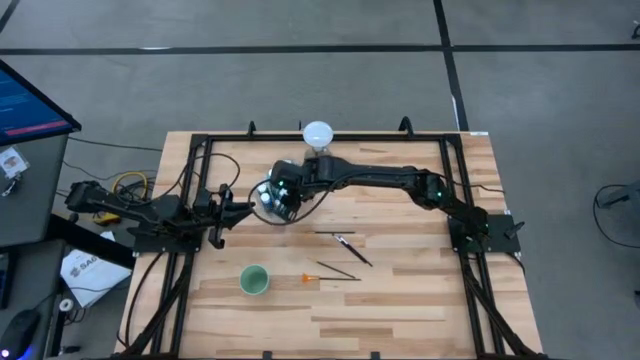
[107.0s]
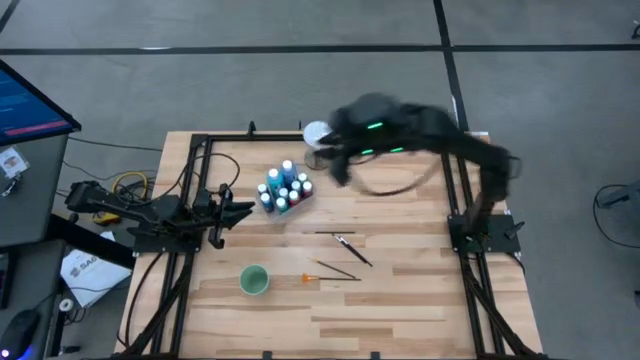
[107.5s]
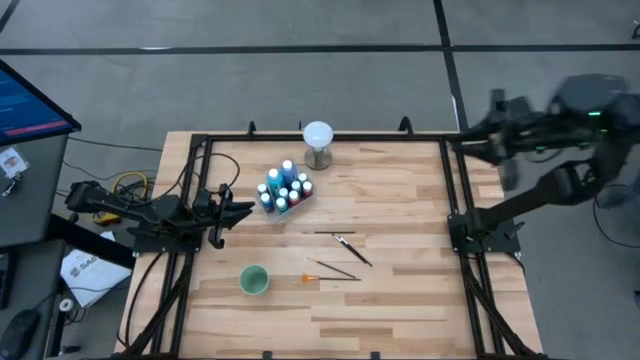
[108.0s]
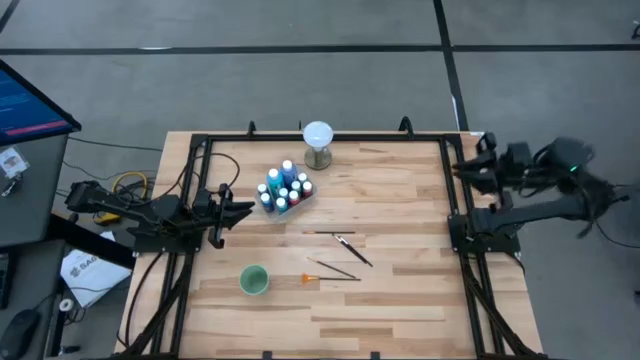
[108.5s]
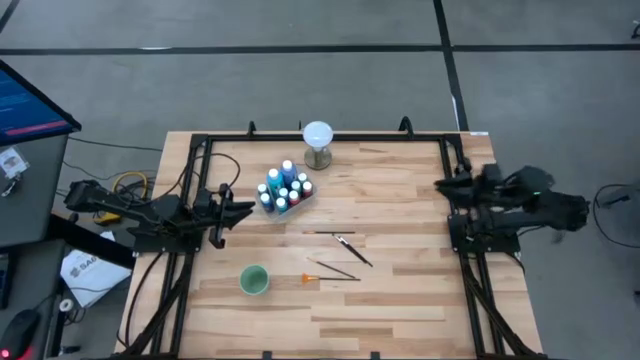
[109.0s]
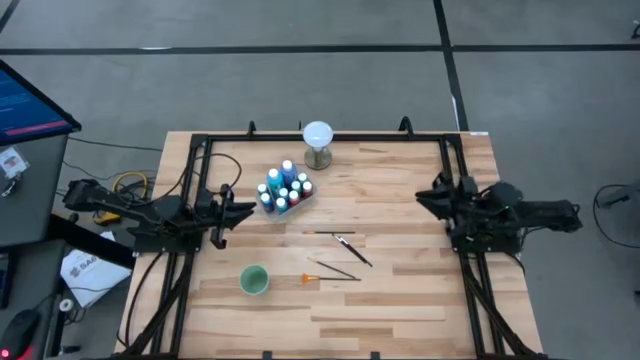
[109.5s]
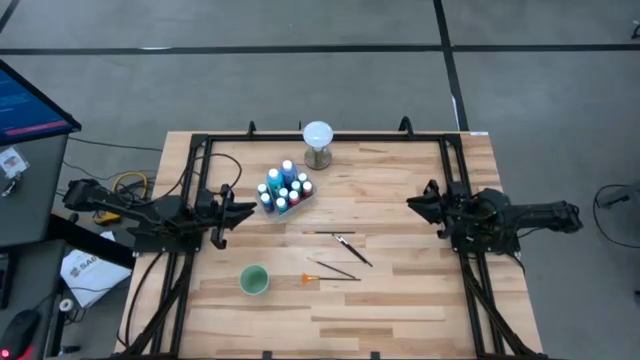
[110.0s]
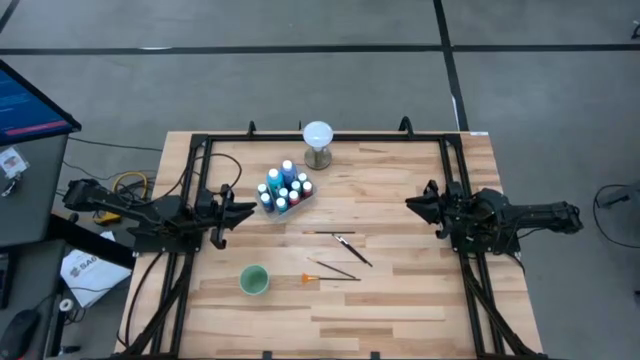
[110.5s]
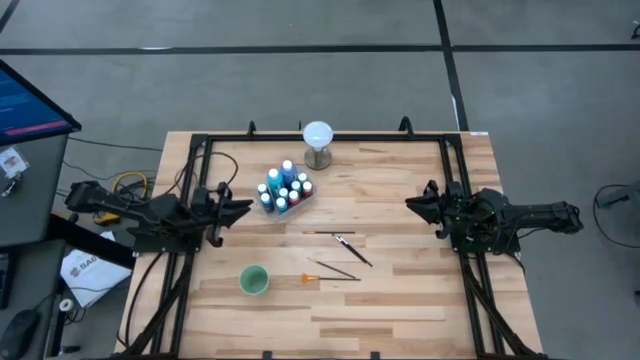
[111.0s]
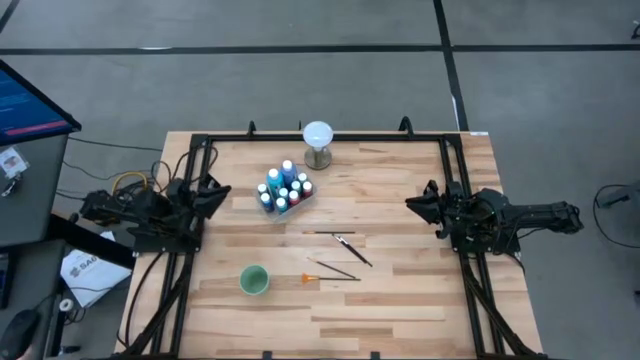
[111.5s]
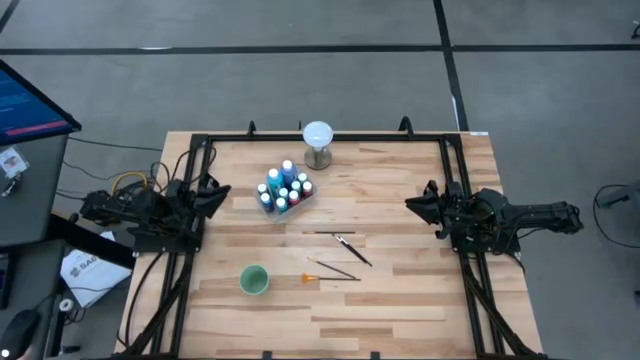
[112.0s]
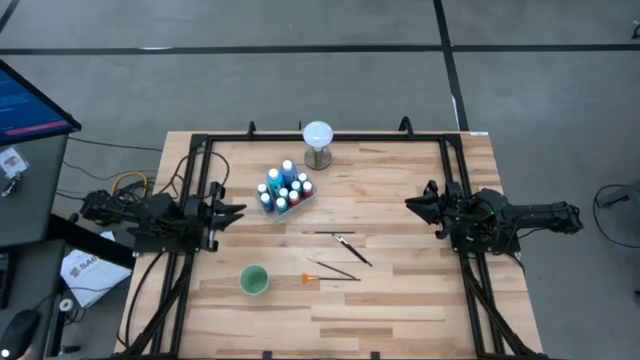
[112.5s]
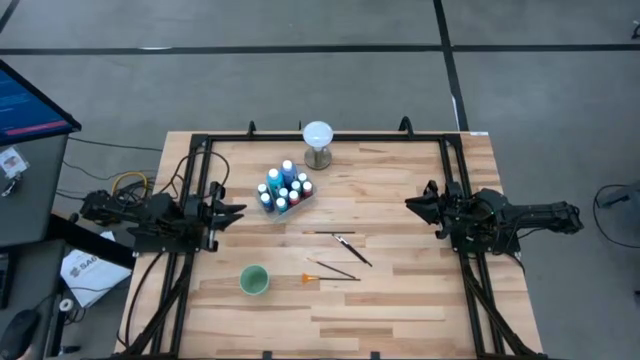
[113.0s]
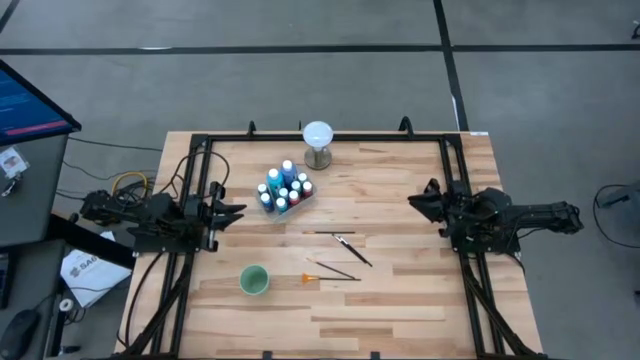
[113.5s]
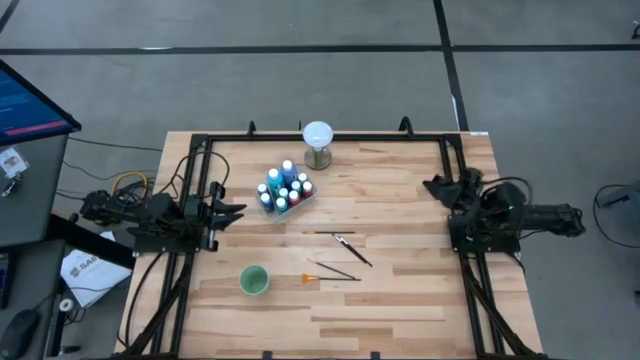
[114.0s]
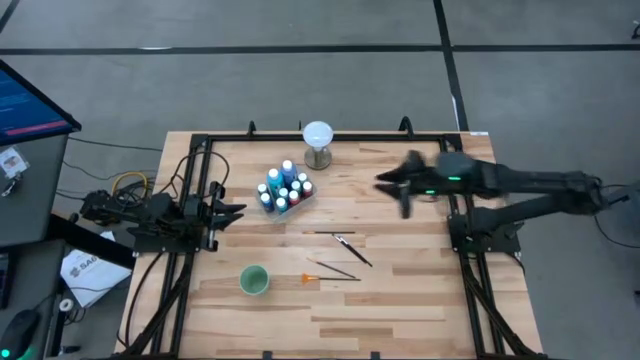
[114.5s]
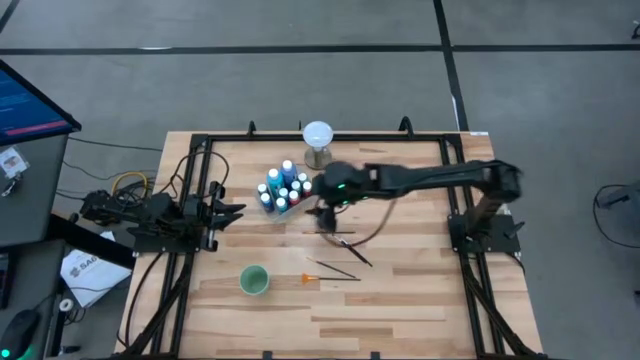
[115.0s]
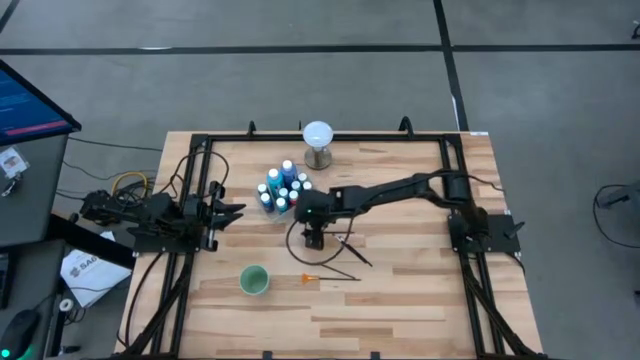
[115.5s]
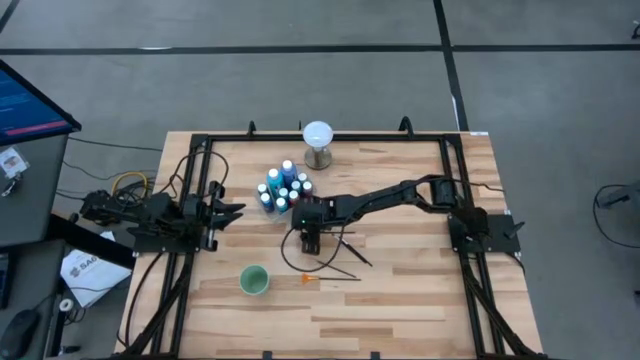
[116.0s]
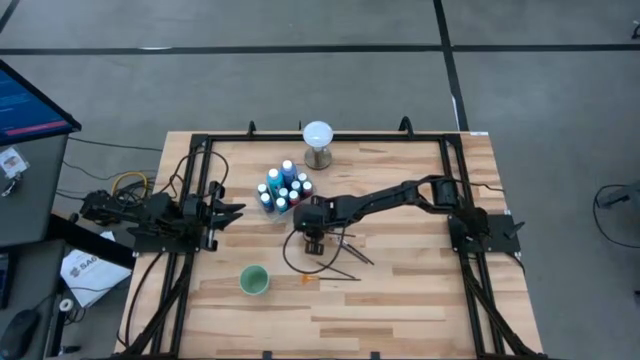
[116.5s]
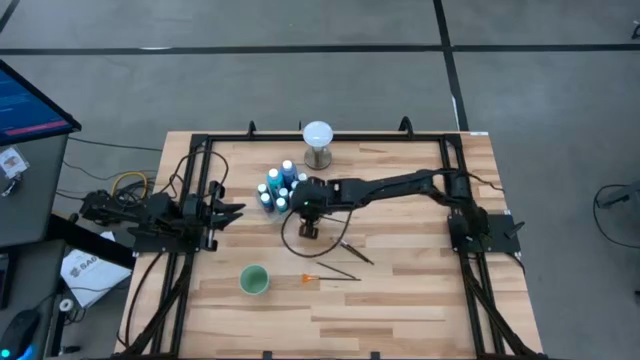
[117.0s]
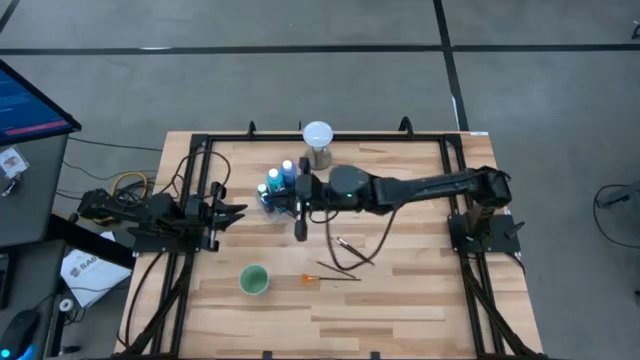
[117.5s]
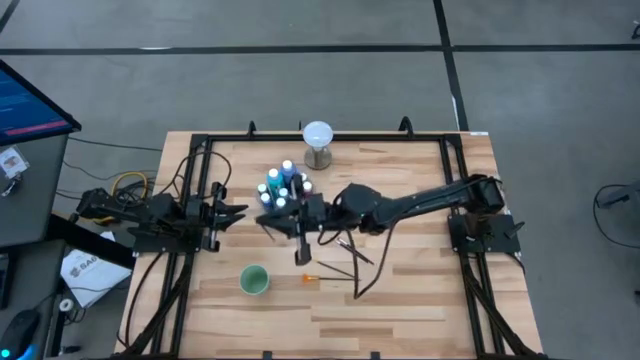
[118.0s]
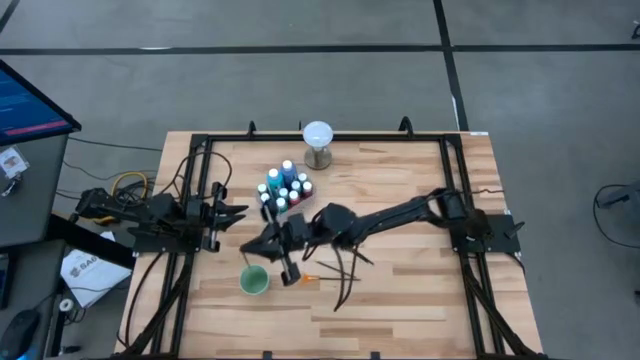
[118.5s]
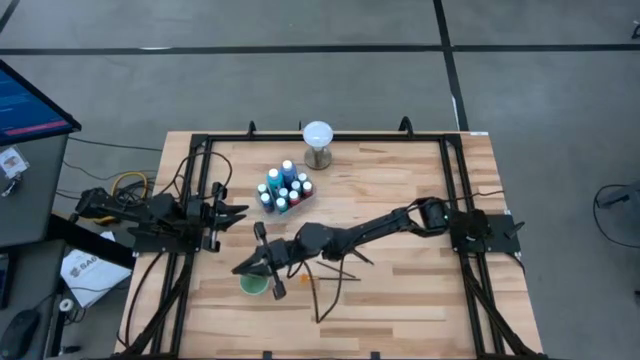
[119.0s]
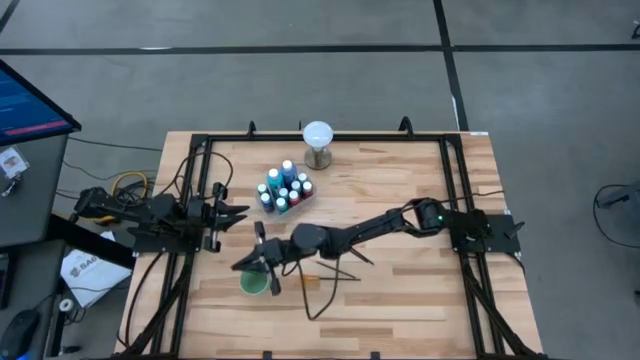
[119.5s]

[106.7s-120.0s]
Task: Pick & Place Paint Supplies
Put the golden paint brush into the green cup

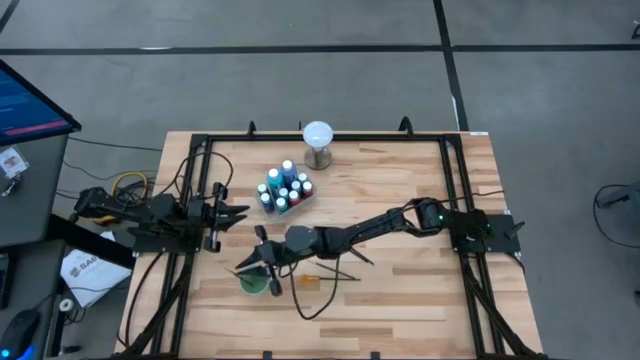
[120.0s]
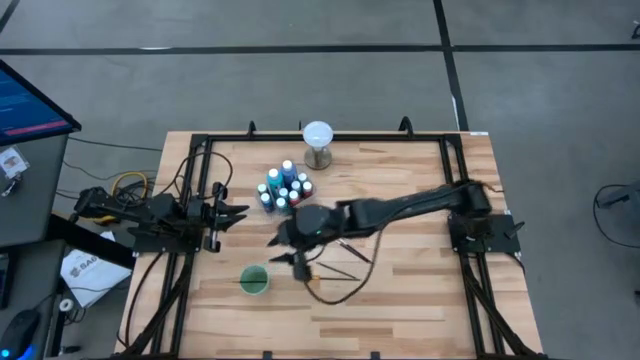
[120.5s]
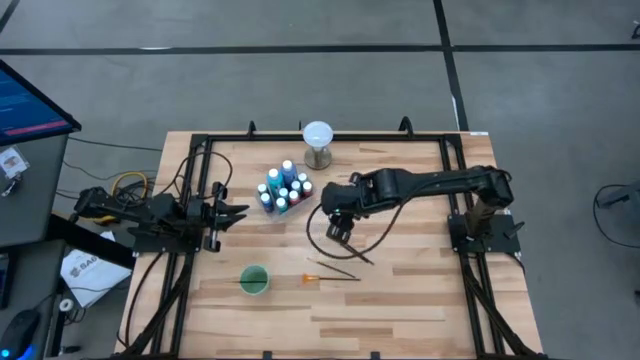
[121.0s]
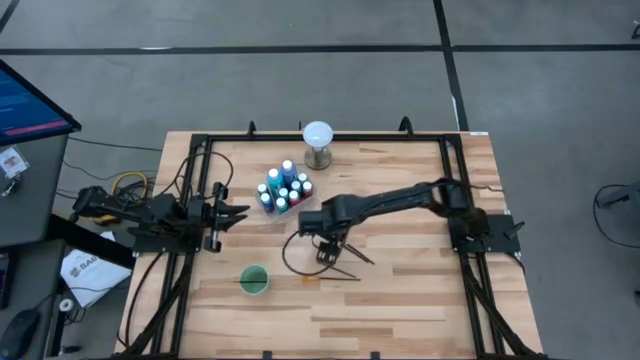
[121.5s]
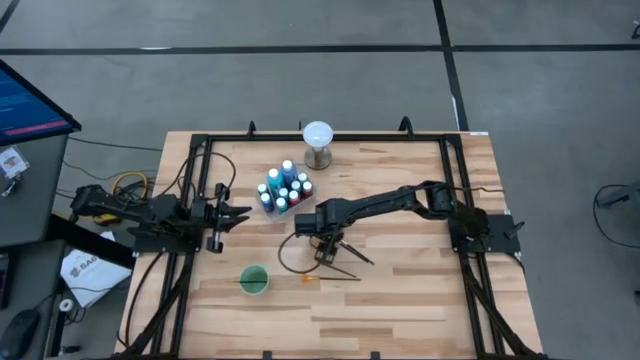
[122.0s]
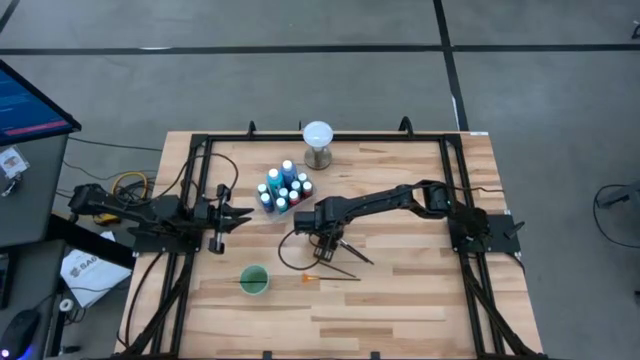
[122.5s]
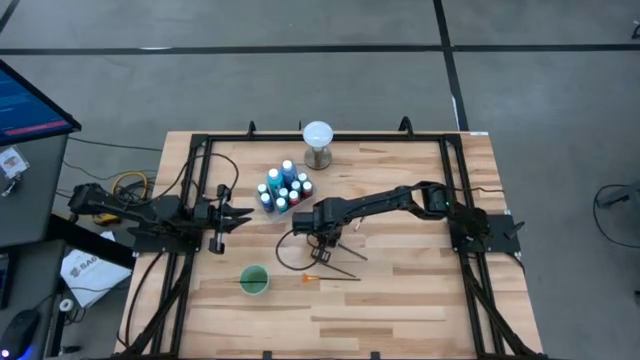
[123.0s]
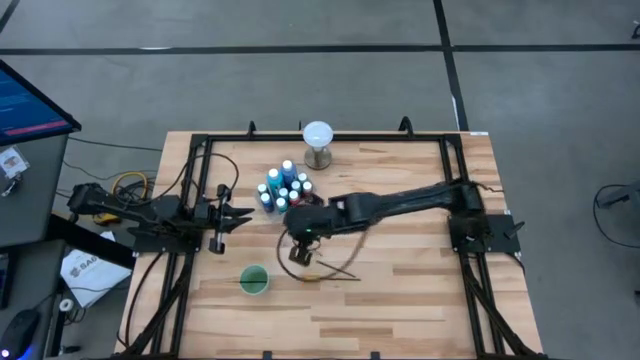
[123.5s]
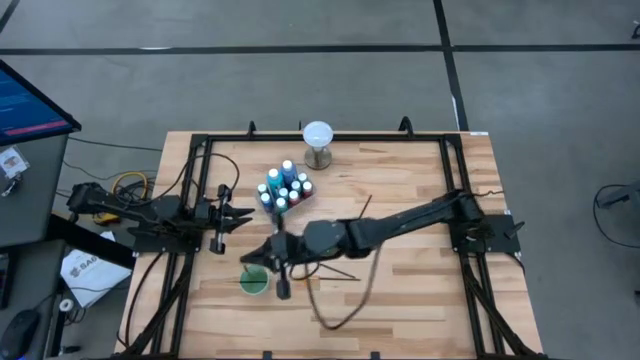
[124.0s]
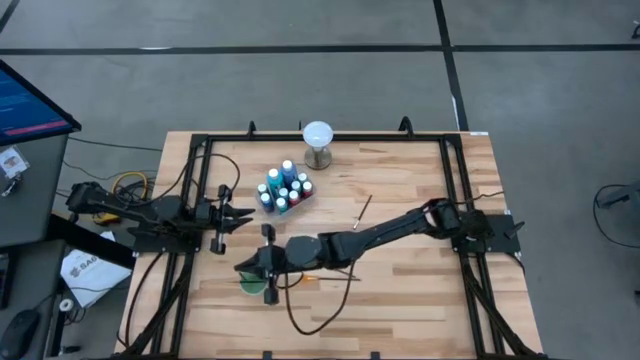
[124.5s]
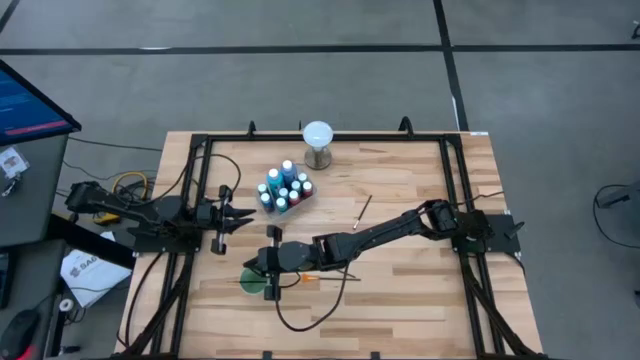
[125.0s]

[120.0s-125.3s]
Put the black paint brush into the green cup

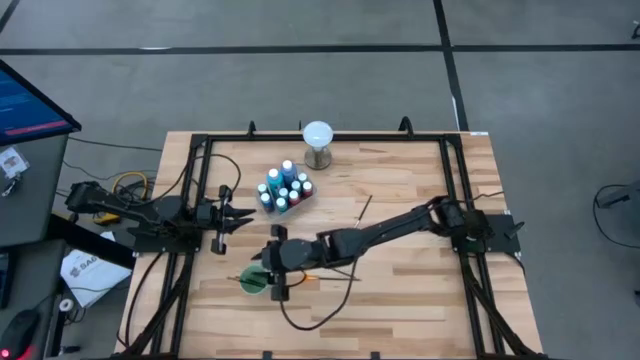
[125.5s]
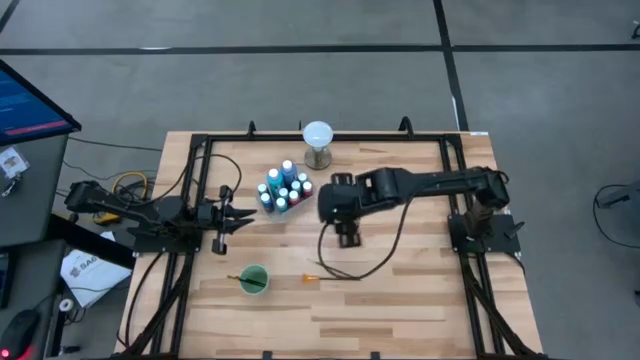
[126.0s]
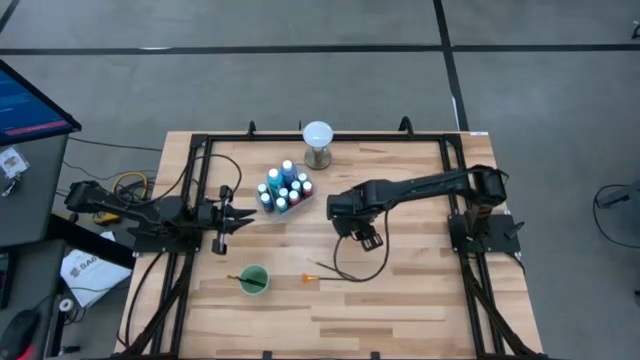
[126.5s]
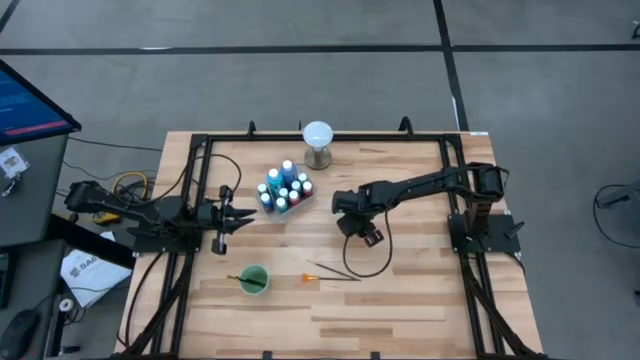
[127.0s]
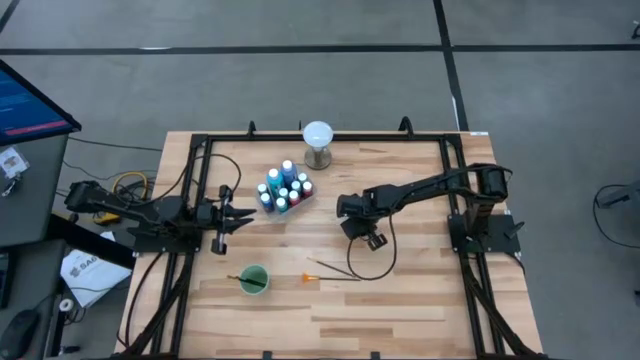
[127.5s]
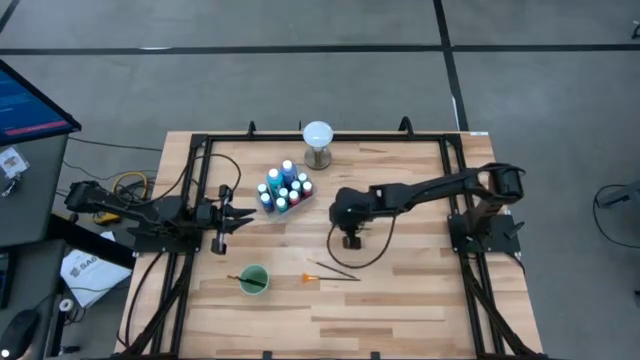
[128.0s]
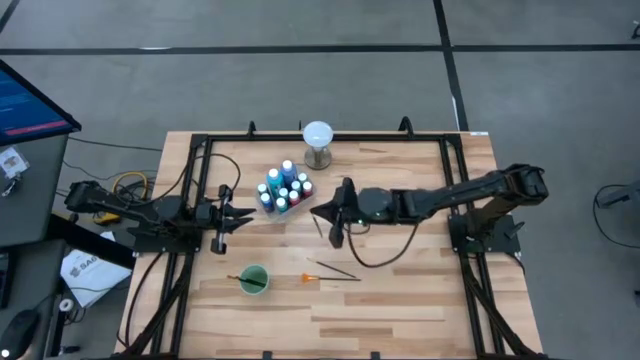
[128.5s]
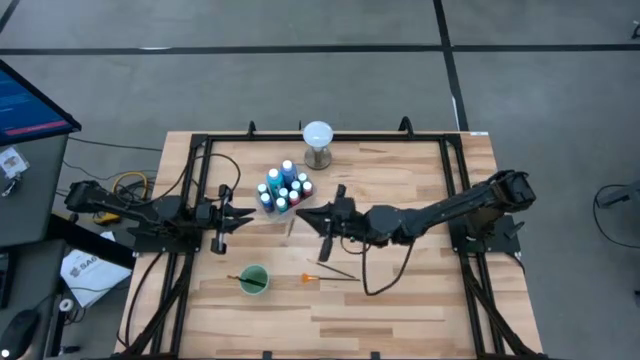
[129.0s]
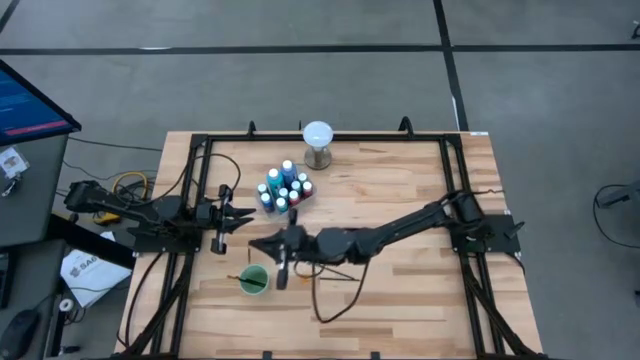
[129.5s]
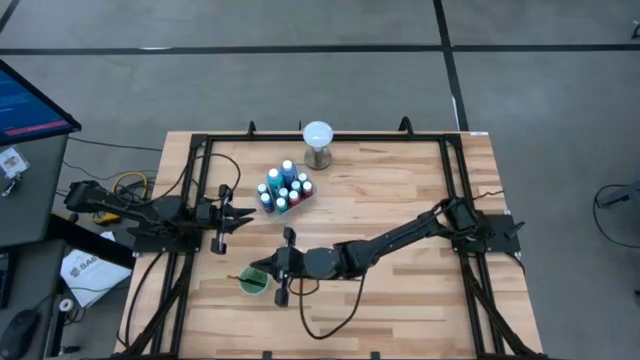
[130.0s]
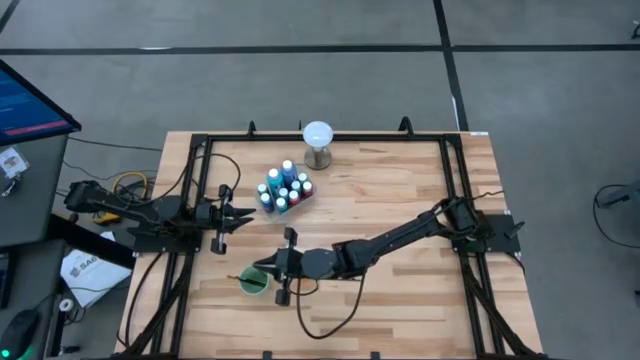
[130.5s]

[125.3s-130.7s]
Put the black paint brush into the green cup
